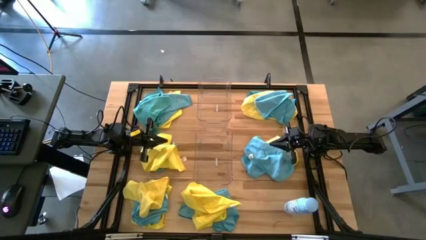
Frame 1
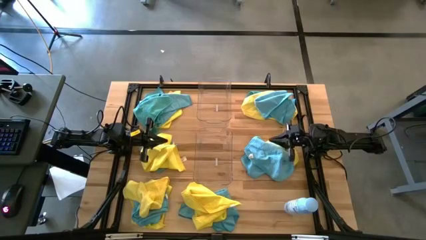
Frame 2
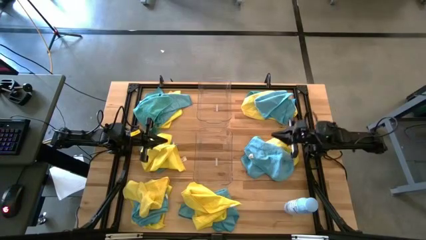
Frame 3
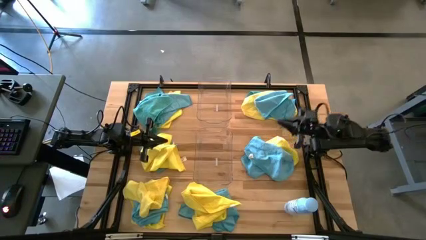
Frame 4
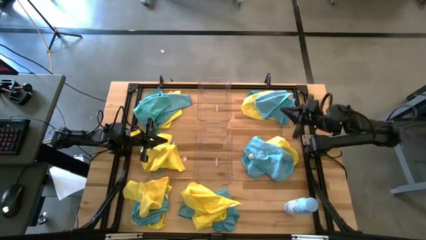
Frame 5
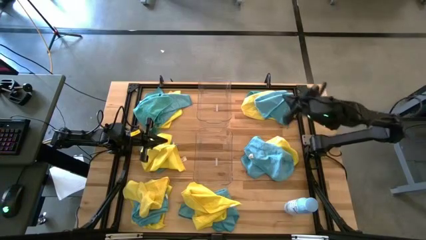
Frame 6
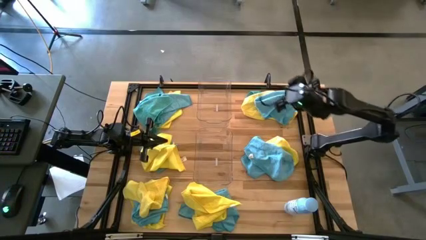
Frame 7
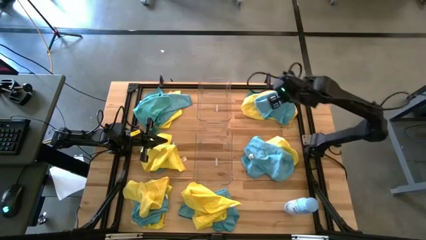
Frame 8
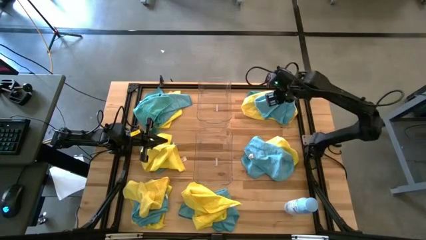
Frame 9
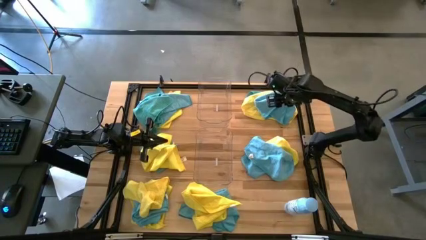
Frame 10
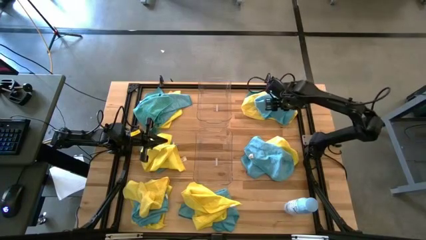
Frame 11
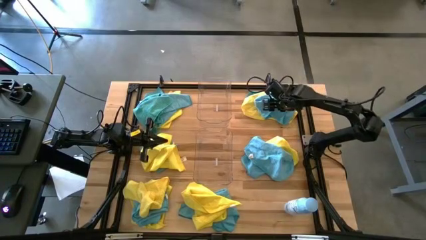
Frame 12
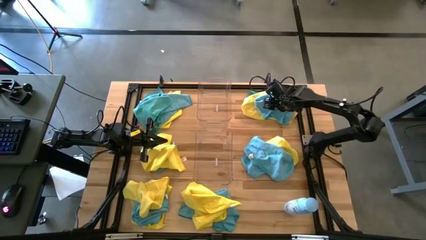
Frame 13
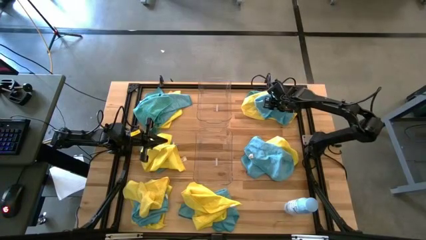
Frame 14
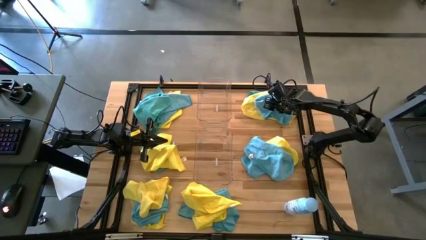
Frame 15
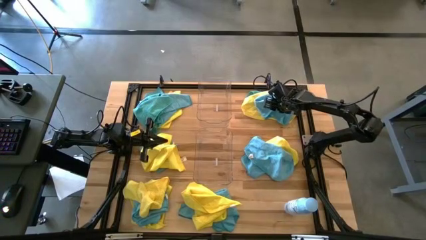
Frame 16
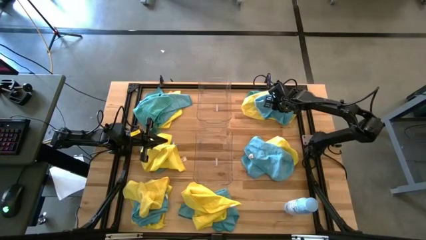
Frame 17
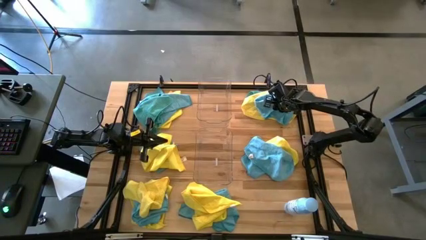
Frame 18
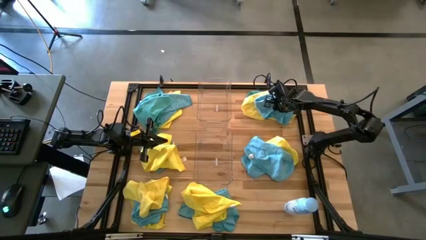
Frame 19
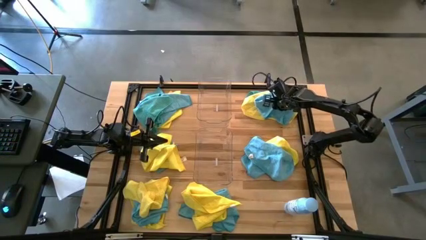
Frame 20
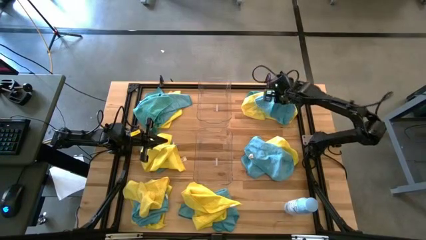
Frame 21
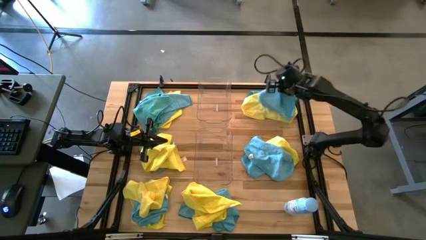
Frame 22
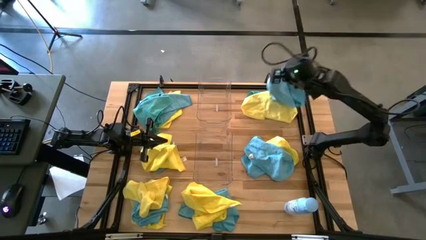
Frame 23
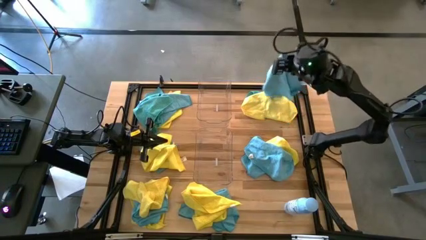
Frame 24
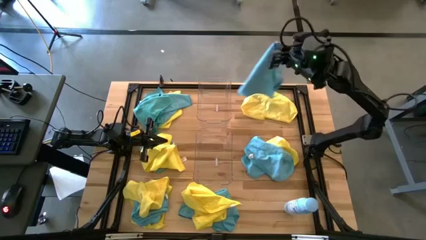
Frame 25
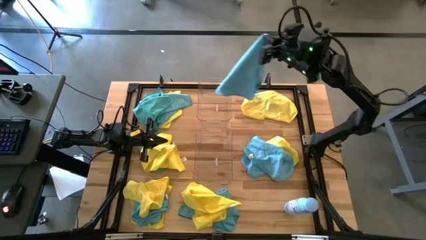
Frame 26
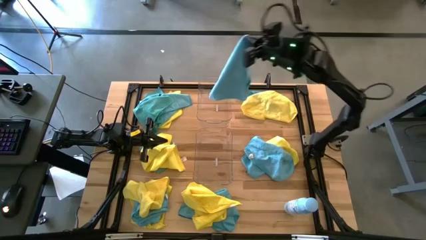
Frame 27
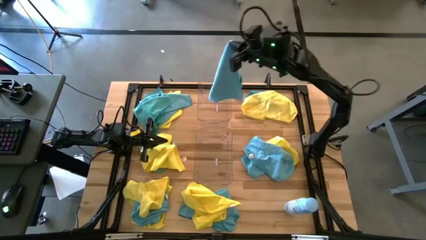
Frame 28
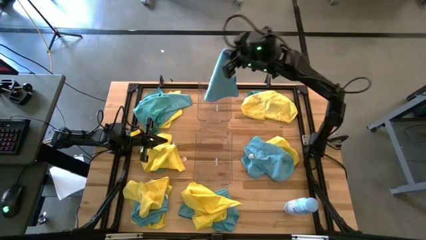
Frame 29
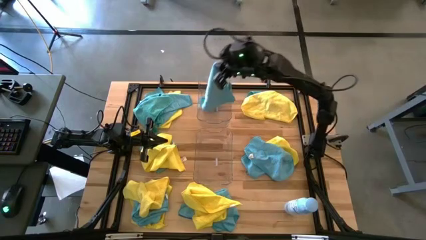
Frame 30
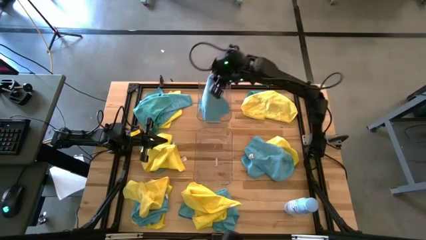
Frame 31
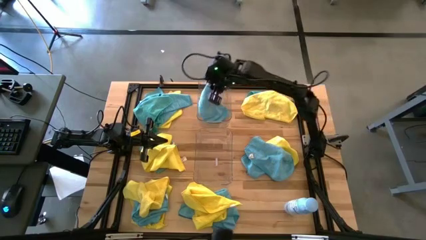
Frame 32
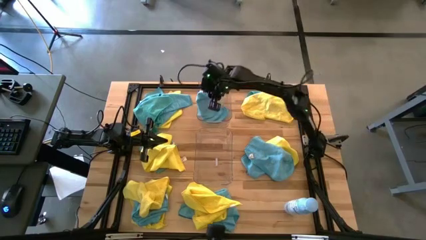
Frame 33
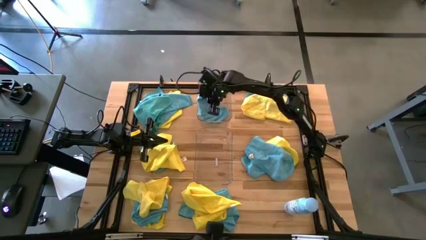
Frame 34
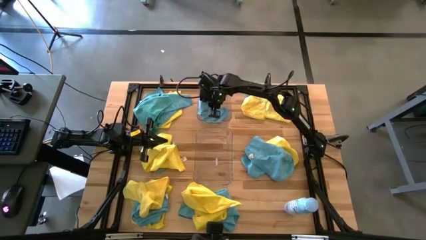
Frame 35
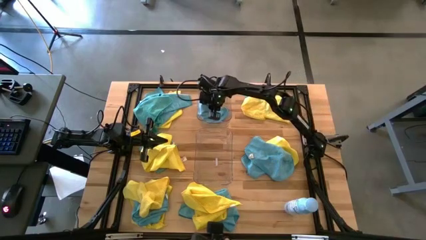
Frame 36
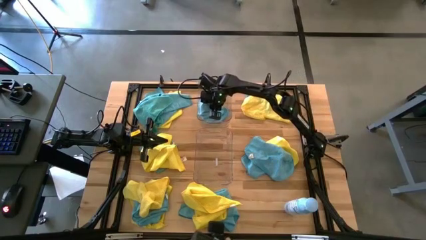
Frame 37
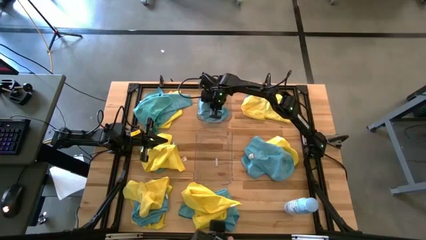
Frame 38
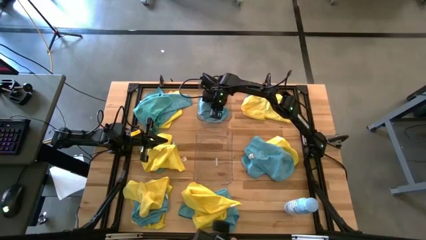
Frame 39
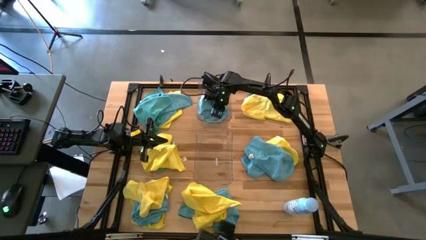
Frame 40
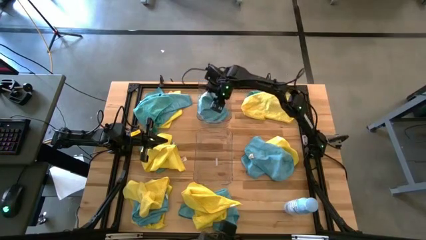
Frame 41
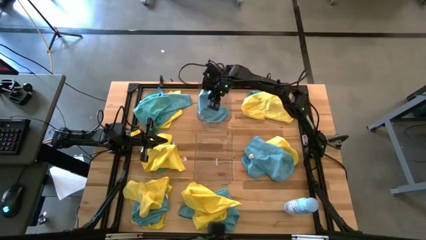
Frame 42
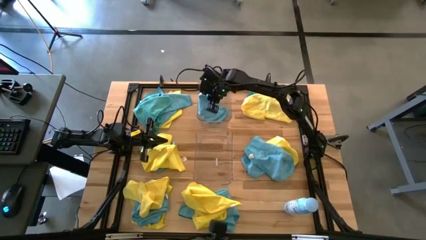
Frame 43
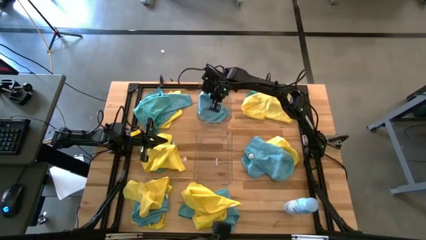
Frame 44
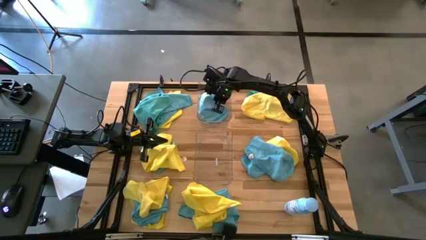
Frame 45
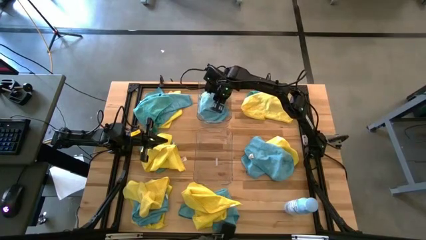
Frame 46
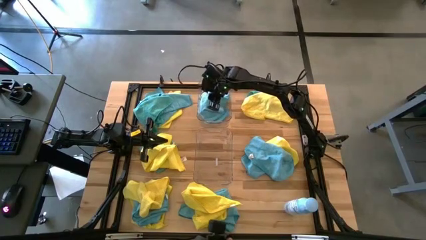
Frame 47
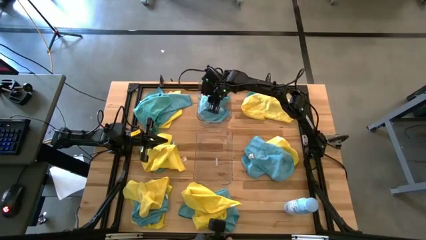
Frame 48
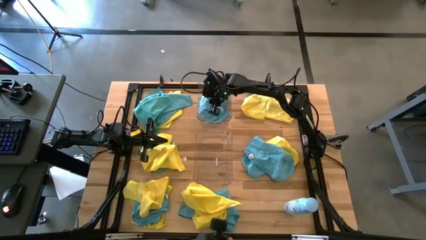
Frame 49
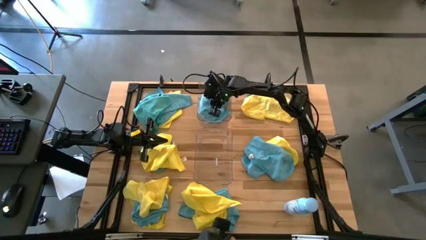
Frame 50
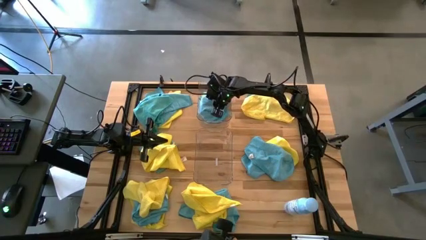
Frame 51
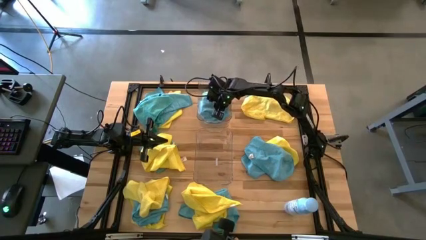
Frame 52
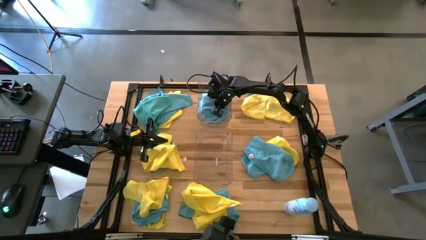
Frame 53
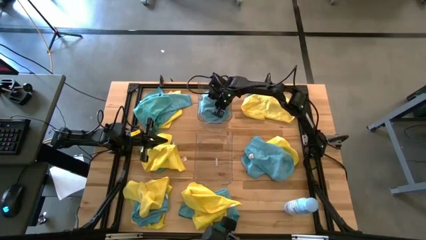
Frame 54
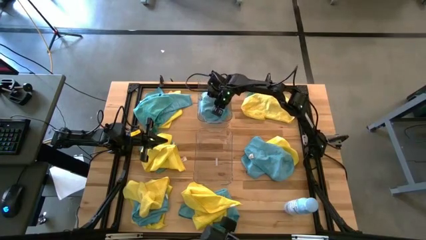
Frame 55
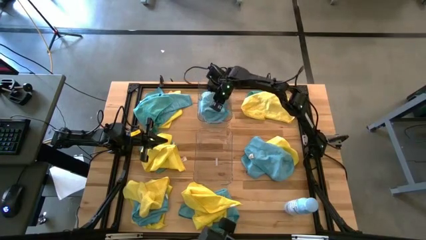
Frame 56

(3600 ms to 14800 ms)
Task: Sort microfiber towel by color & place in baskets
Put the blue towel into the top transparent bin

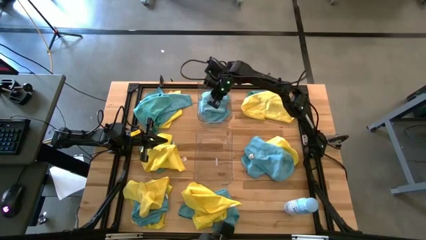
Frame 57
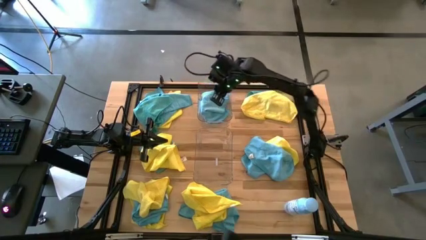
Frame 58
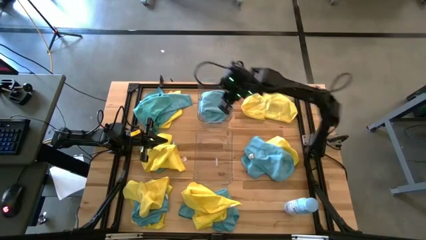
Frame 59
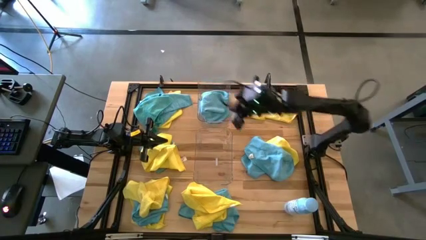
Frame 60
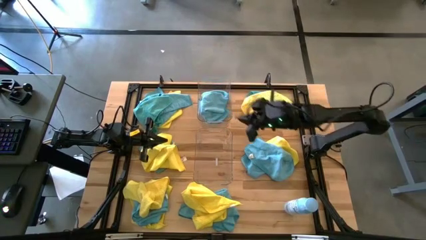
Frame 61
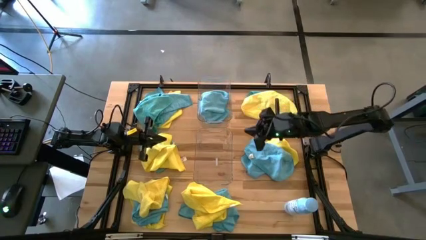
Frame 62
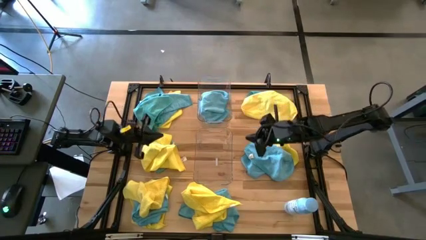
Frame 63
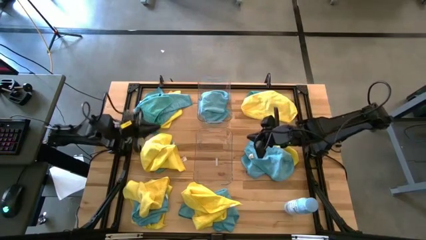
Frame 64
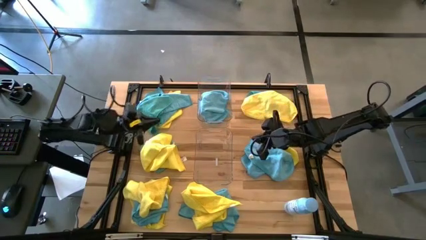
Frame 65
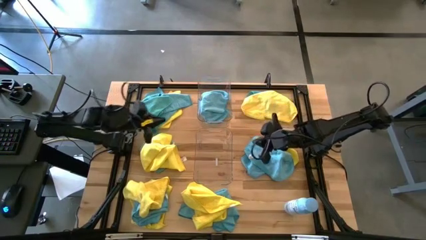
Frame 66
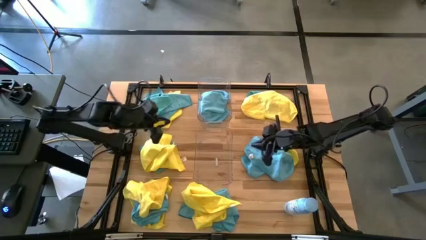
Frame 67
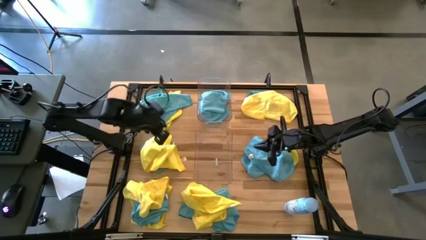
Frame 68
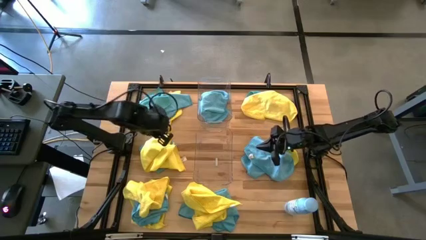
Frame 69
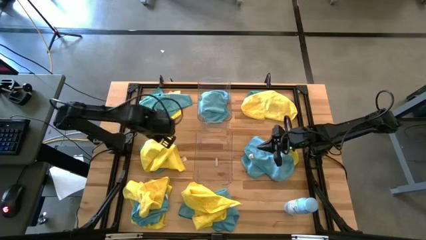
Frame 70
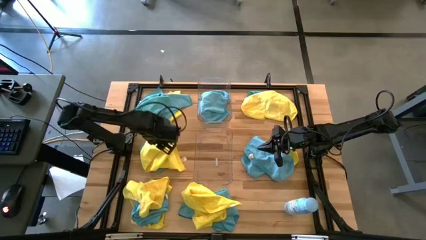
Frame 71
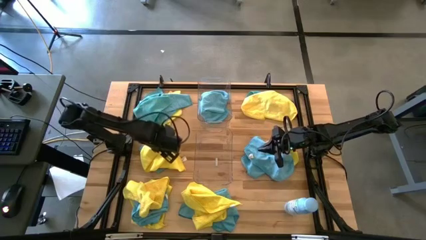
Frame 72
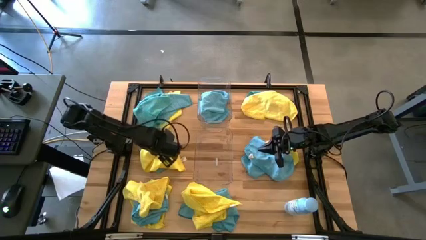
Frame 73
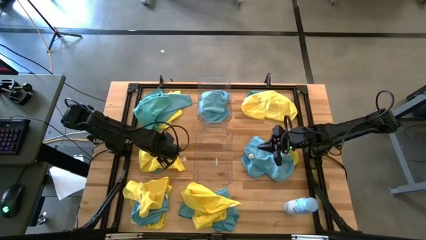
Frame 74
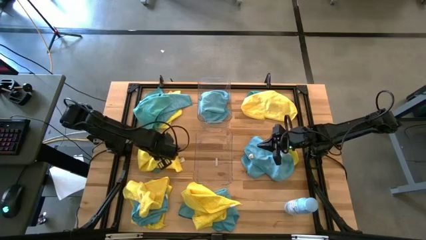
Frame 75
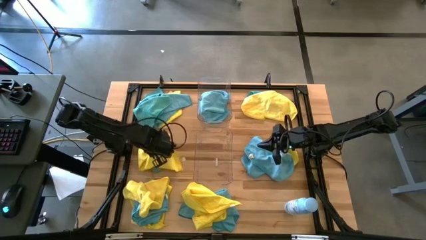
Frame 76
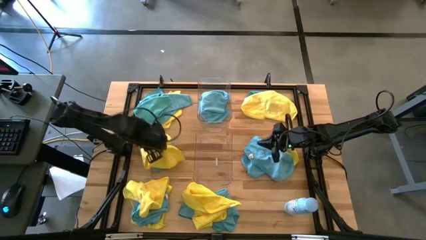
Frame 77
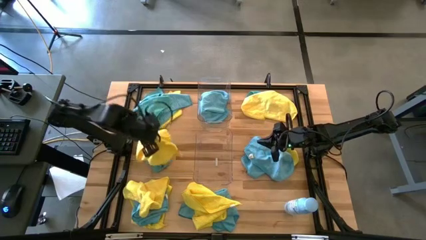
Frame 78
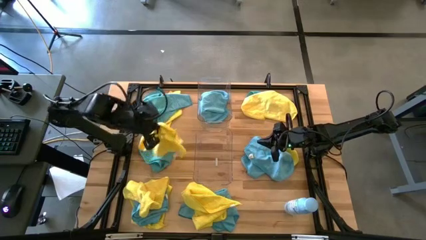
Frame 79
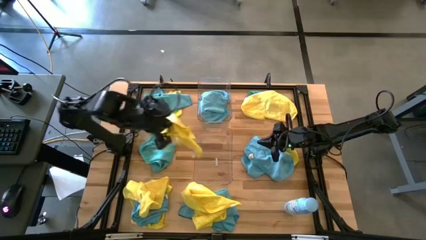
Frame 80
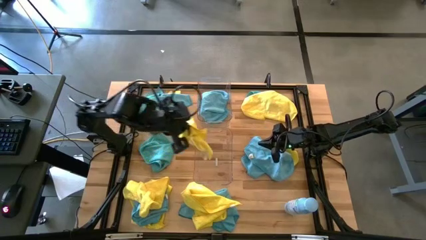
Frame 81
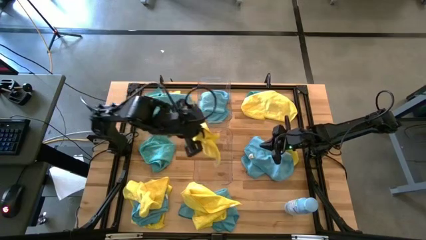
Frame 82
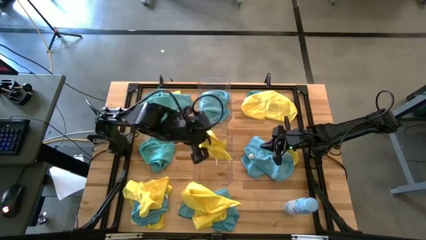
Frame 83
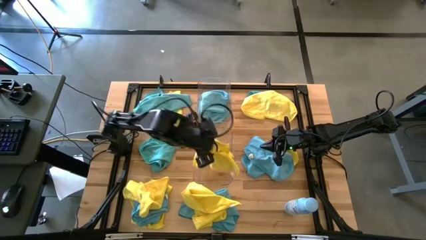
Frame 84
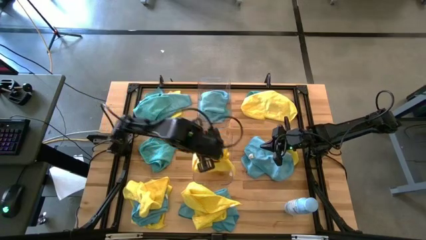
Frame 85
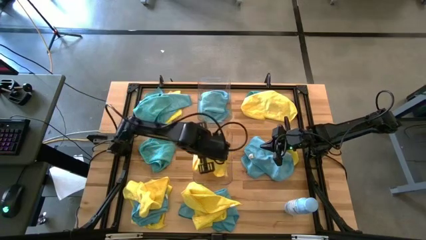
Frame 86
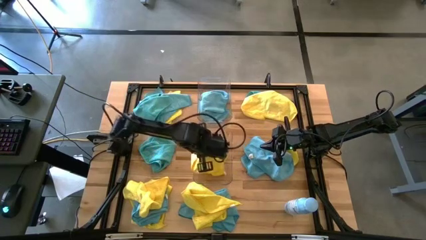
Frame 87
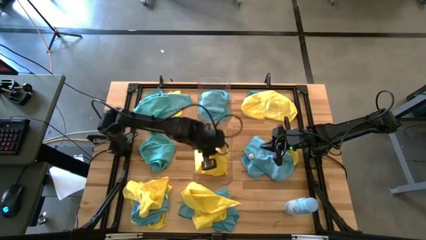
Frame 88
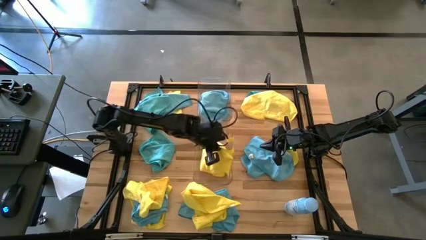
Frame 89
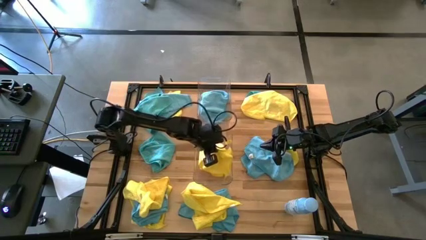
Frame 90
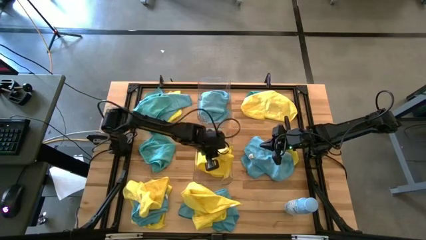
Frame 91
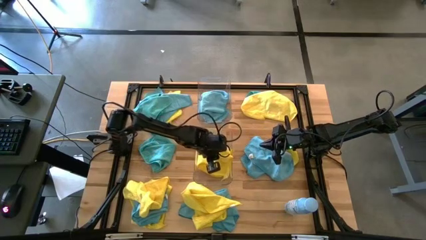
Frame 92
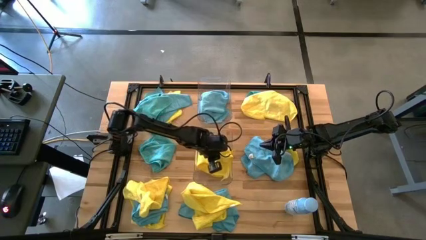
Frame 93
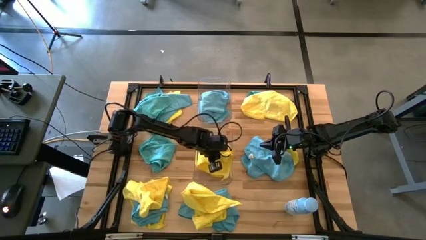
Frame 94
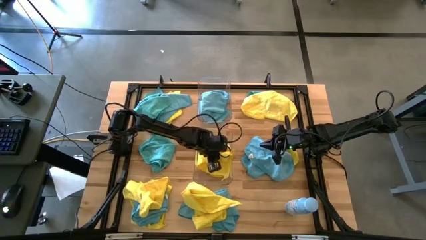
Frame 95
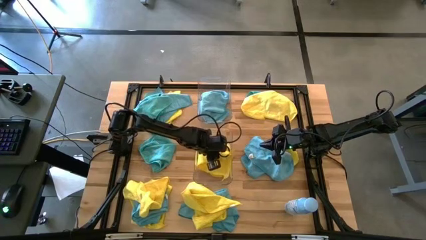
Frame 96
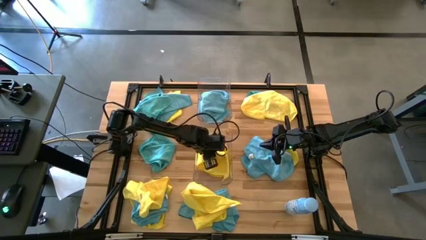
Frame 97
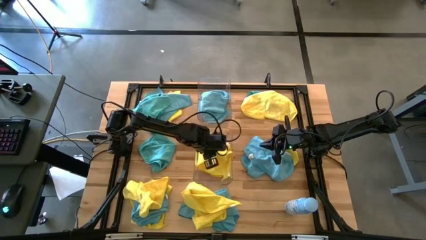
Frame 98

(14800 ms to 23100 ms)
Put the yellow towel into the bottom transparent bin
